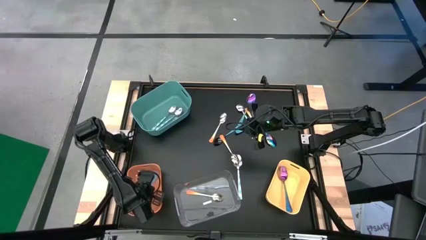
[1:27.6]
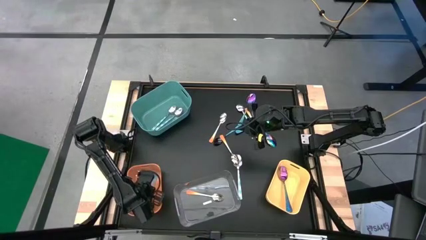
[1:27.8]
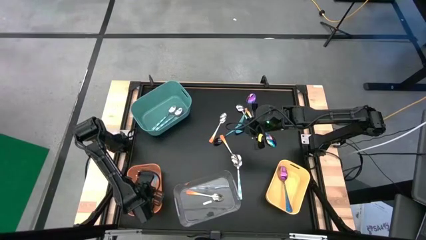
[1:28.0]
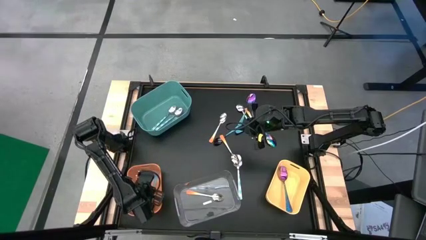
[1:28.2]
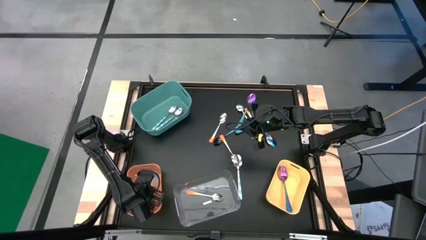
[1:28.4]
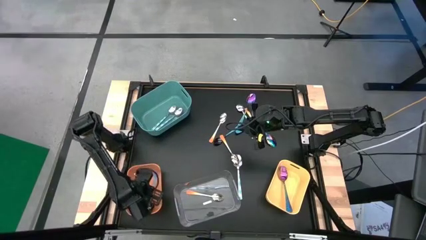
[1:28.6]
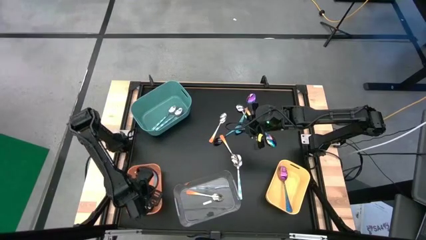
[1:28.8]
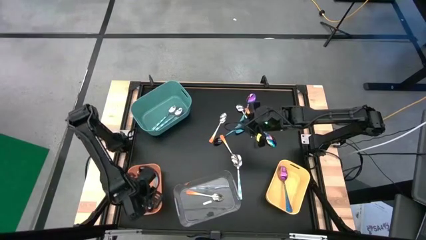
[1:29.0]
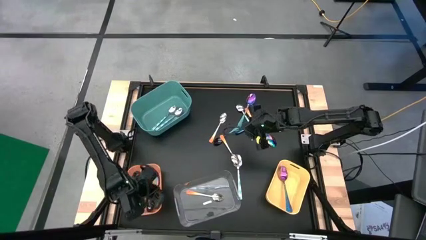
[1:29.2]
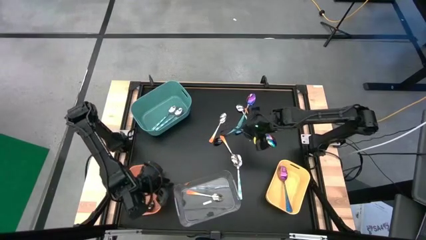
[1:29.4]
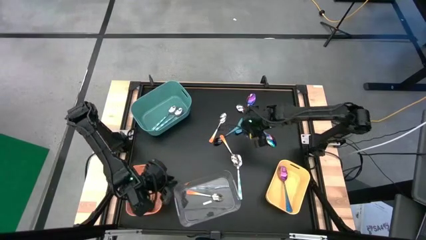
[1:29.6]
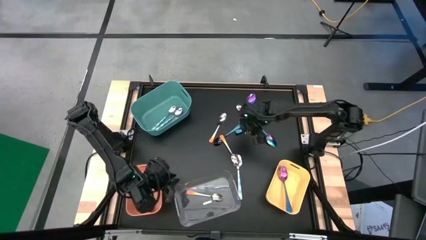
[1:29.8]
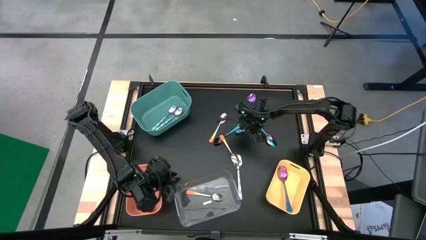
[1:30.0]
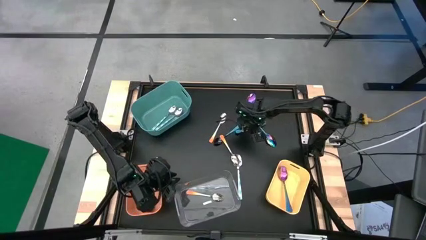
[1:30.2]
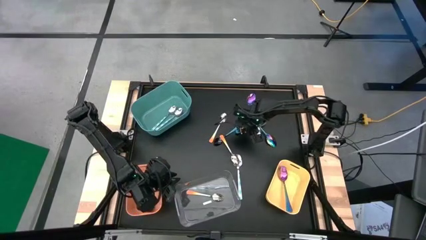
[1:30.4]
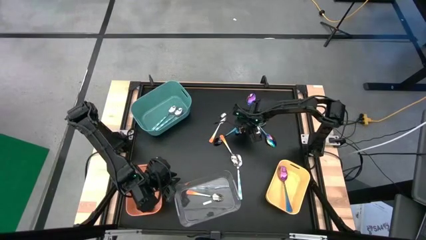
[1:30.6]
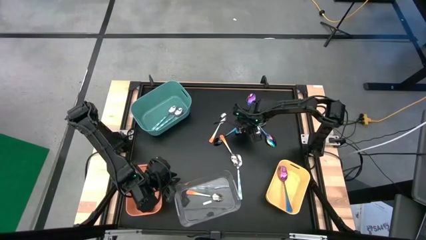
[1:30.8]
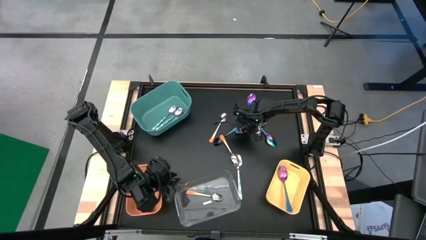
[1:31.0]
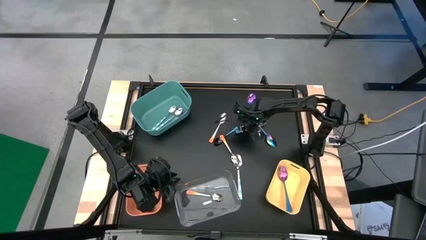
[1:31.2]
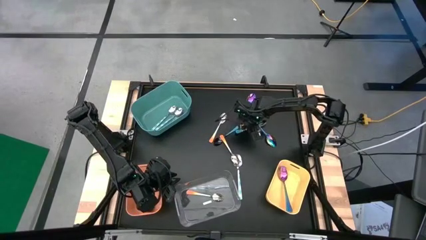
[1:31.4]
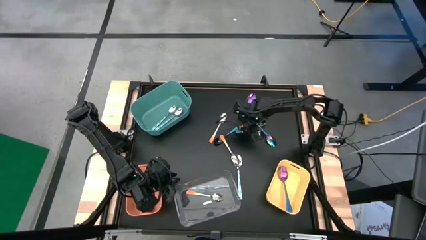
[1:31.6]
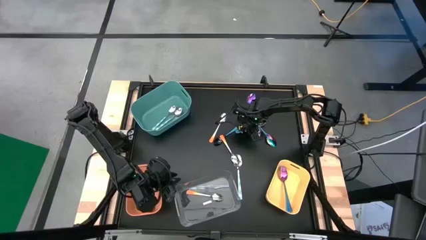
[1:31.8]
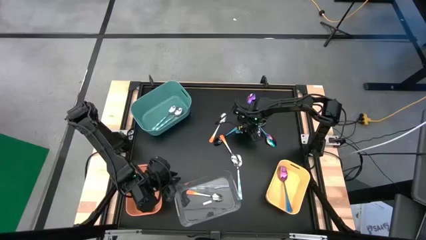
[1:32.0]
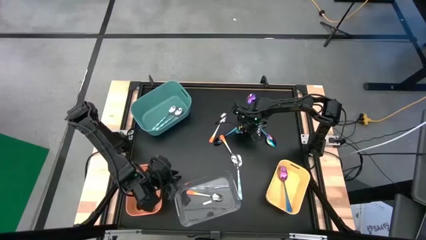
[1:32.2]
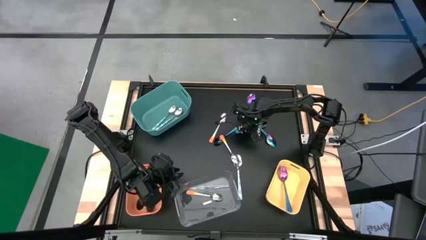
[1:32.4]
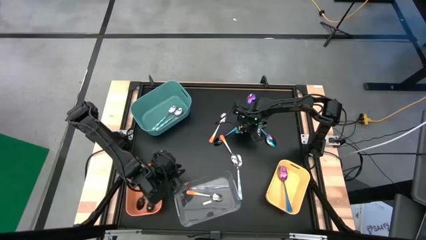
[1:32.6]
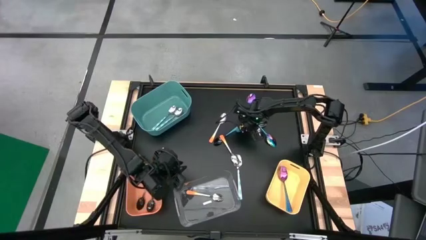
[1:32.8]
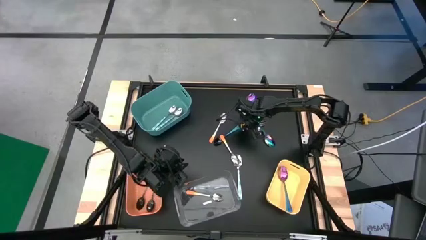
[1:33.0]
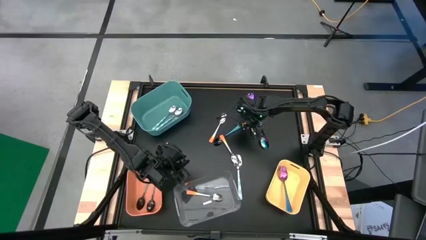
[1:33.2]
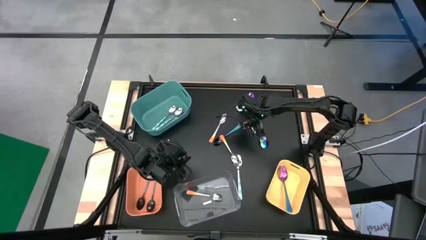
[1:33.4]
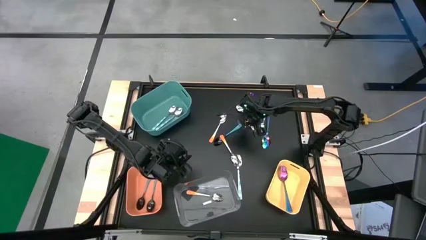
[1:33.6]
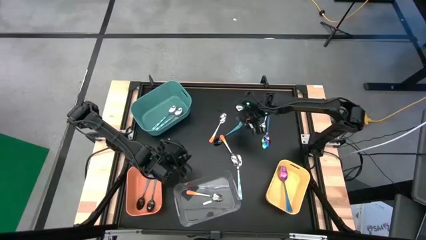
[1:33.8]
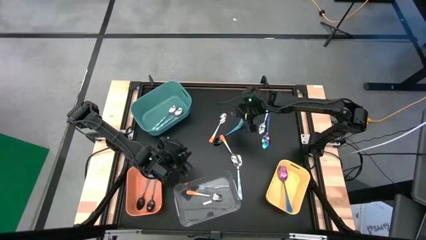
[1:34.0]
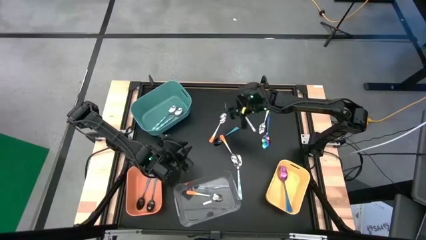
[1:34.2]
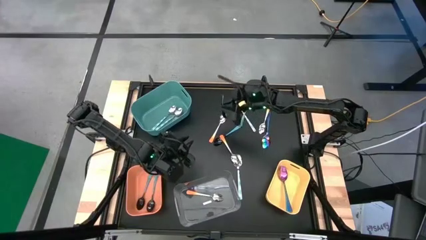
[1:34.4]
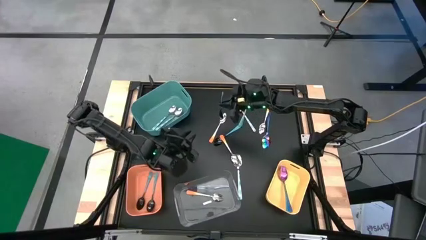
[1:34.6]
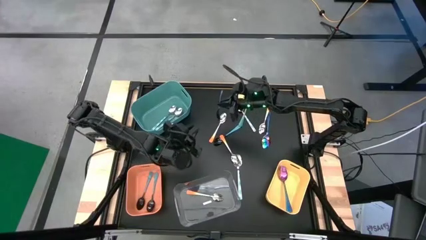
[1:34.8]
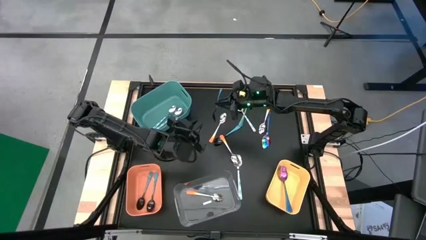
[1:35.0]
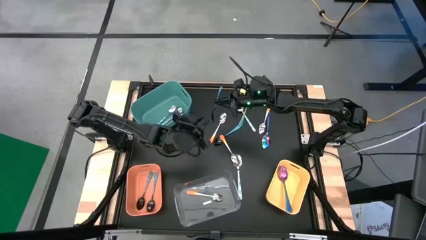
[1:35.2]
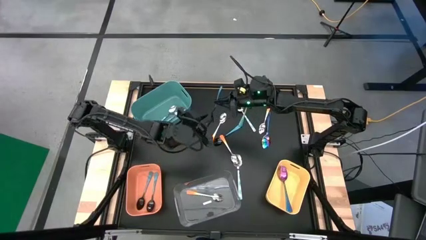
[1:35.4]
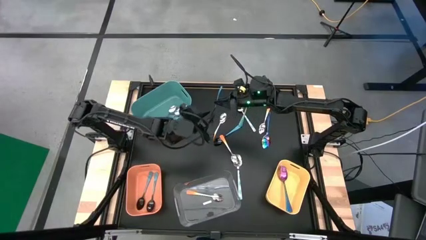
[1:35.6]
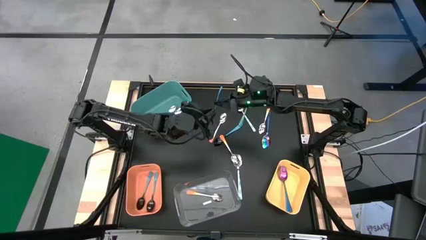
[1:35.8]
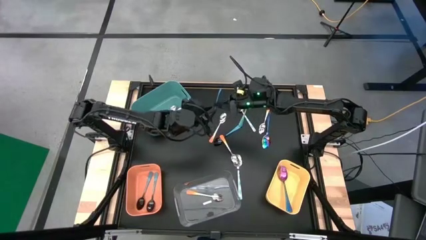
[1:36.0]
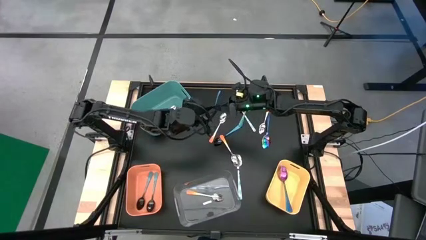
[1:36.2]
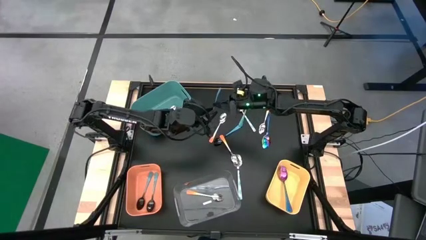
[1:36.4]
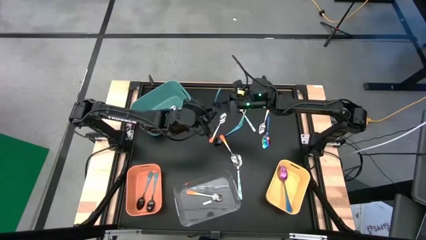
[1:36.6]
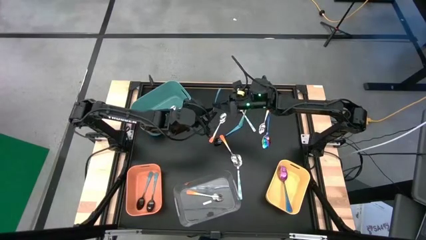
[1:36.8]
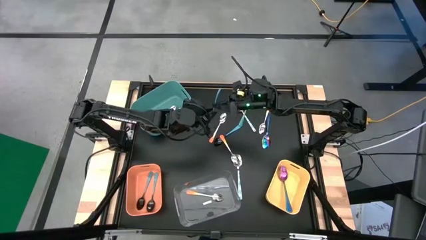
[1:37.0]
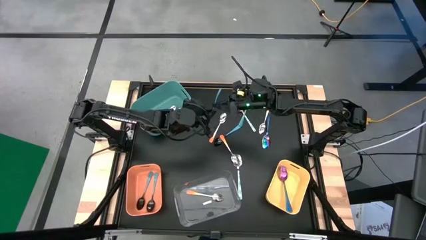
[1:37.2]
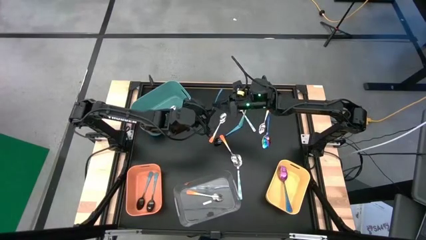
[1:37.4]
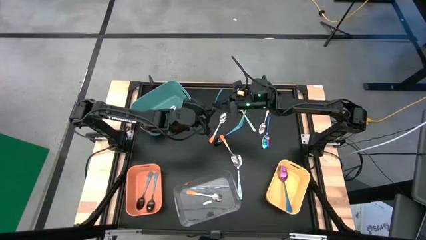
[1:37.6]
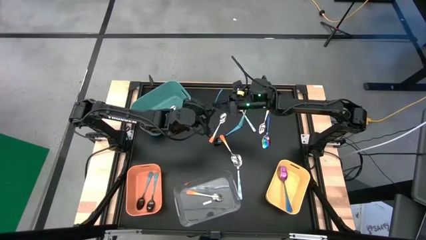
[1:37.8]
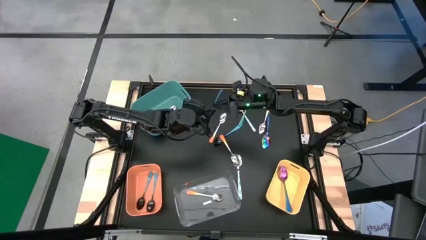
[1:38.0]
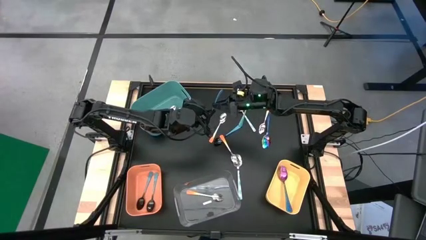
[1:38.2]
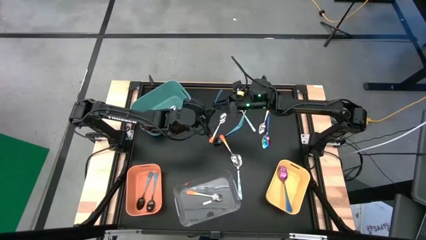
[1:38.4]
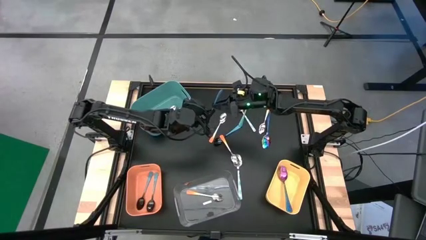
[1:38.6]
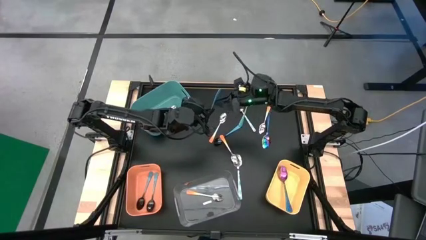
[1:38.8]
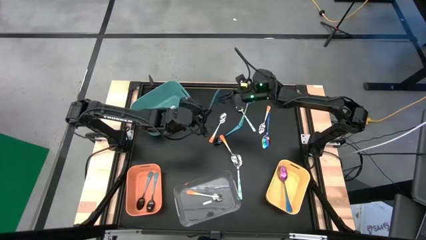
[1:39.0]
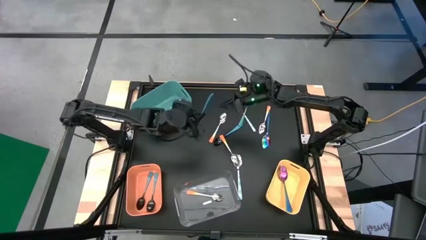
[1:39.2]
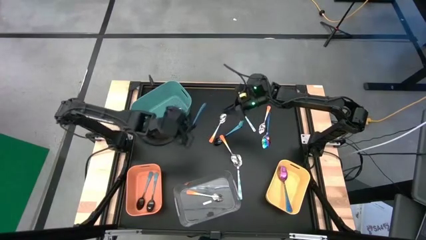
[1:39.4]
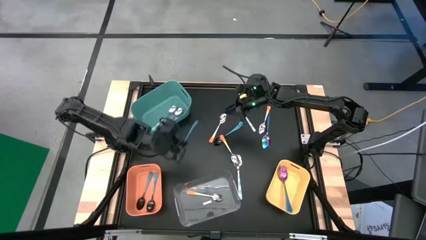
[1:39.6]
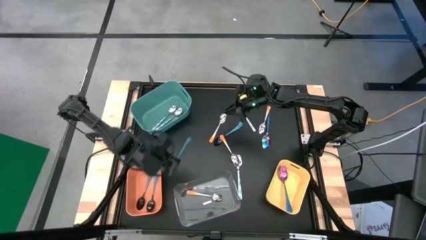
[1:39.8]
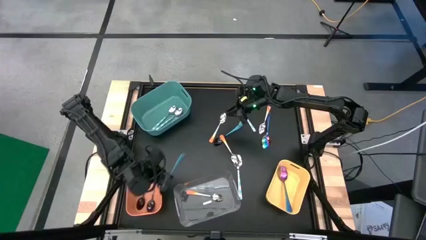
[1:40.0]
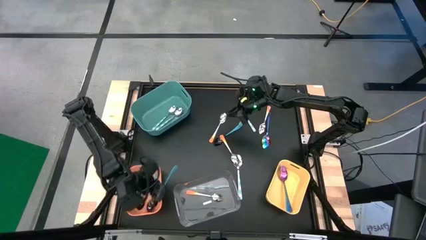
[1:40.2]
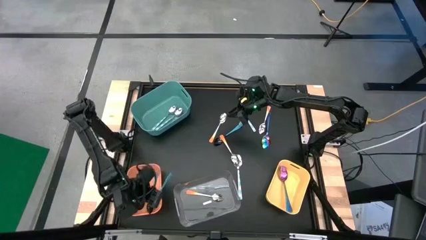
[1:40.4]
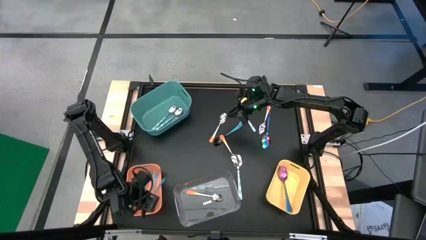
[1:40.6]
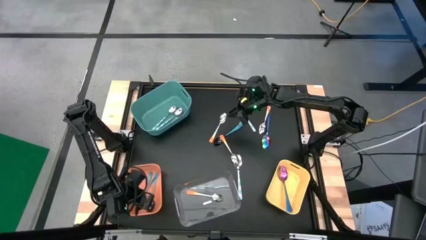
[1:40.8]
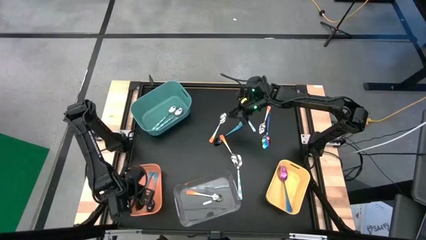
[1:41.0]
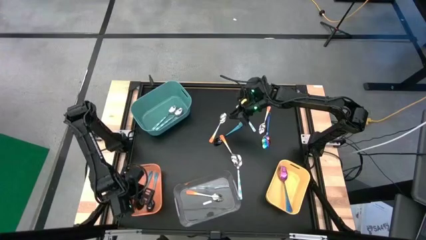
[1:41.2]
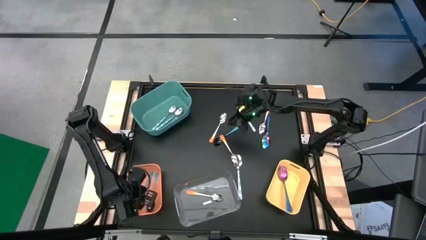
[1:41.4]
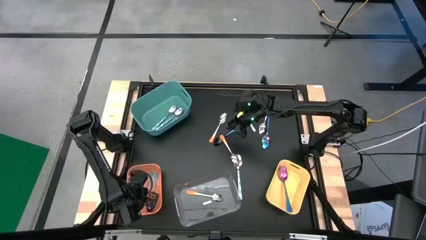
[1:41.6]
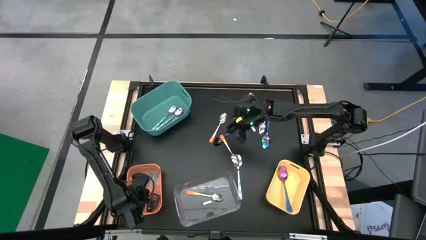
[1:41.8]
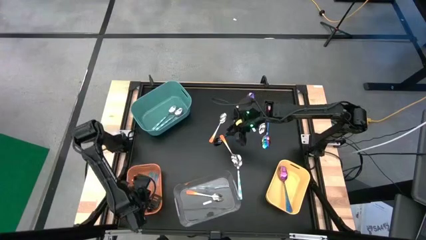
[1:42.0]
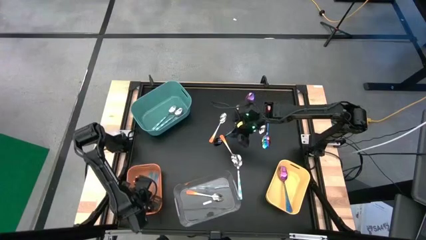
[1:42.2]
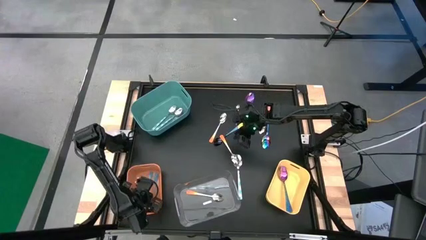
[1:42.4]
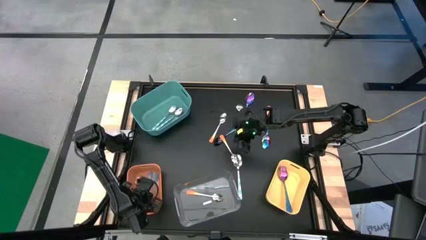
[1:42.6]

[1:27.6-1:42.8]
Task: Sort silverware by color (type)
Put the blue spoon into the orange bin

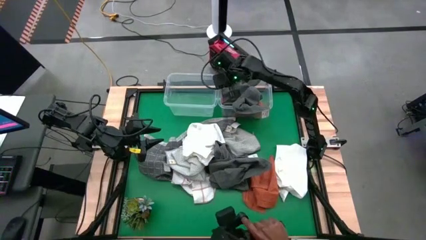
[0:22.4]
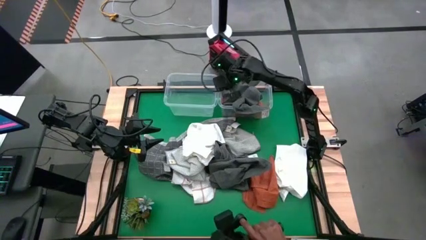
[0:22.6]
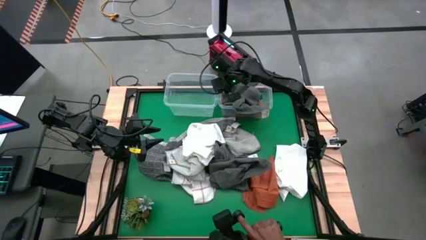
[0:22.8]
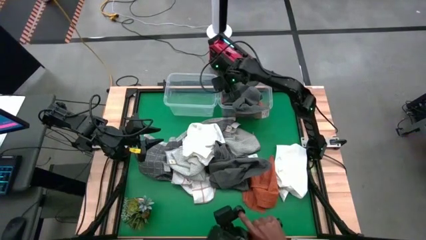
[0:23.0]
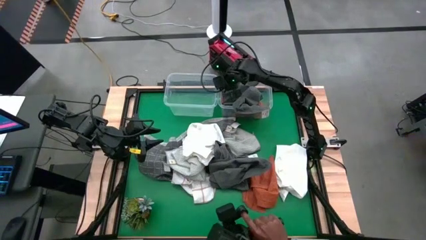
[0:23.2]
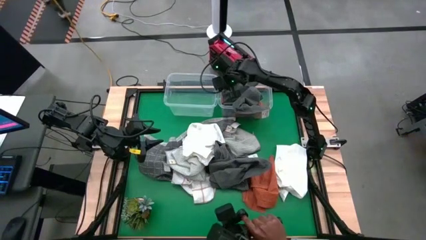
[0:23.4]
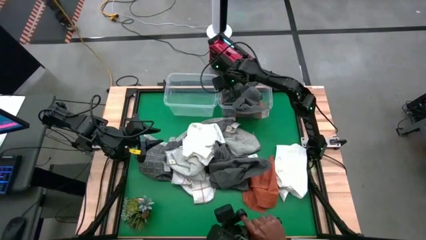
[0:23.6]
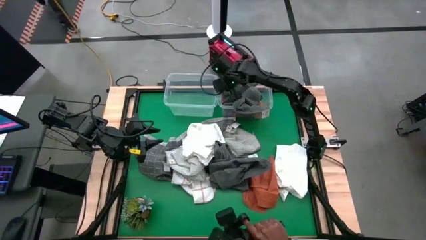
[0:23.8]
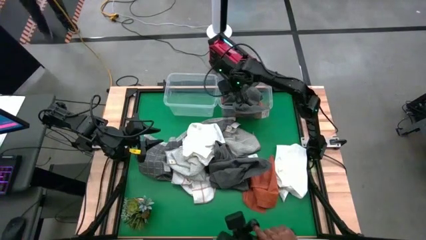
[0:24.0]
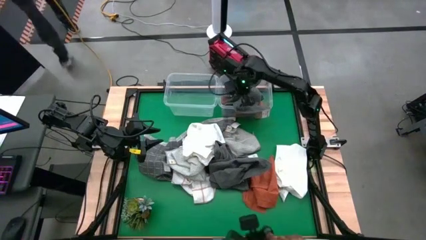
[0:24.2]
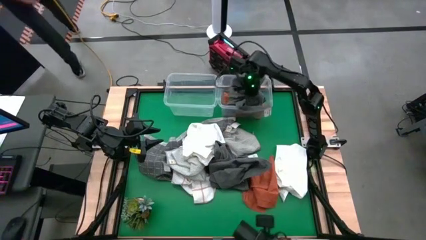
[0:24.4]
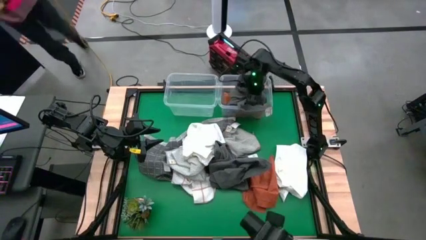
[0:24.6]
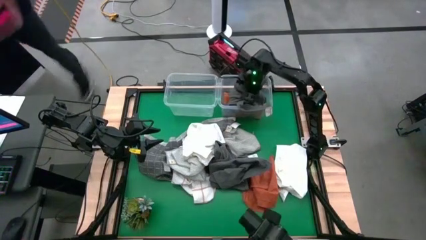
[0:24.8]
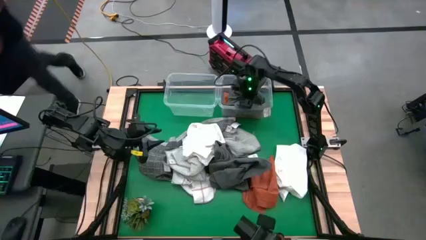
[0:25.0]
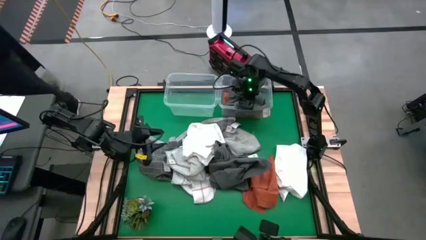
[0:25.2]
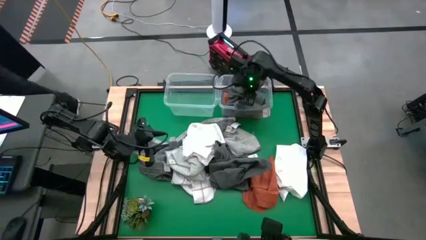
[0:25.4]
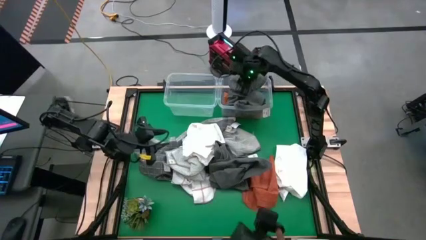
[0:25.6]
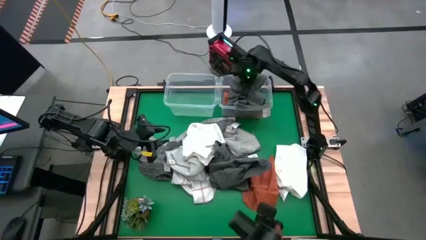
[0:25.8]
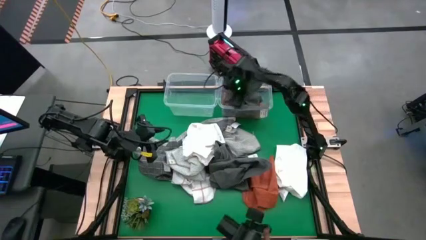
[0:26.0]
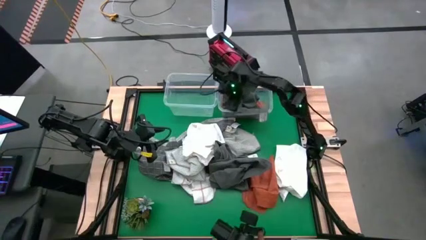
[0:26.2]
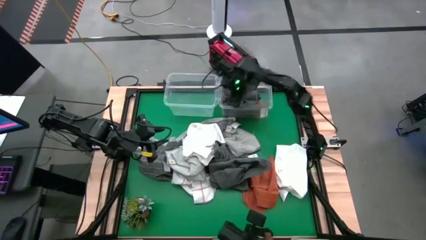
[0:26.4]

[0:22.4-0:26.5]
Task: Sort towels by color in basket
Put the black towel into the right transparent bin
